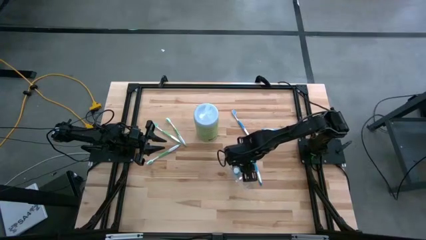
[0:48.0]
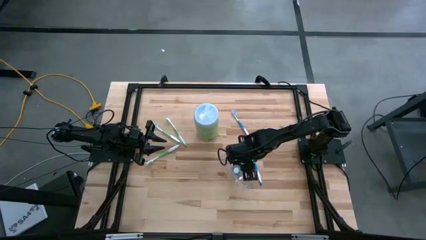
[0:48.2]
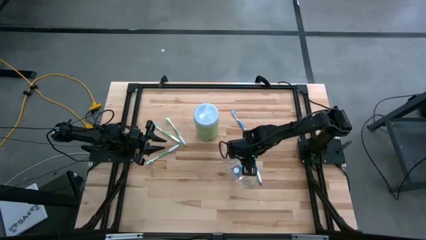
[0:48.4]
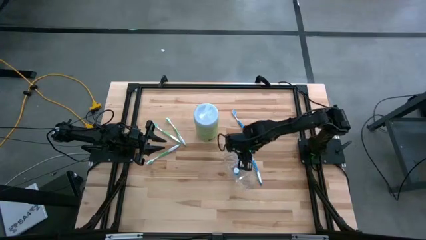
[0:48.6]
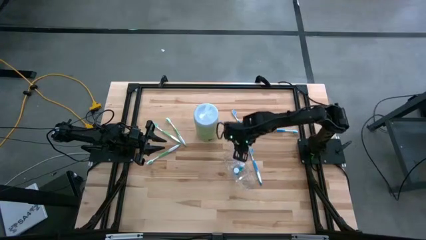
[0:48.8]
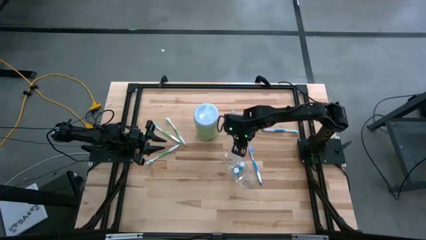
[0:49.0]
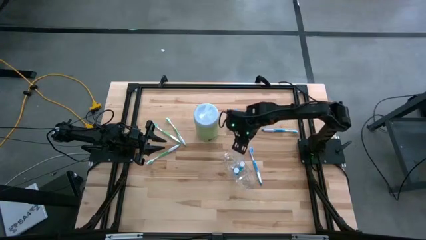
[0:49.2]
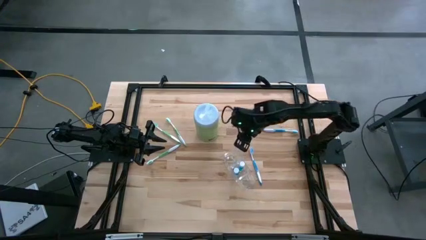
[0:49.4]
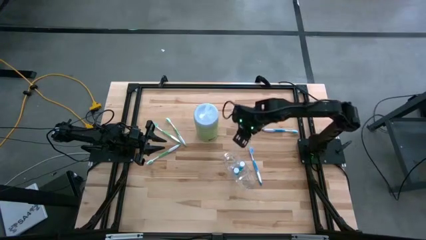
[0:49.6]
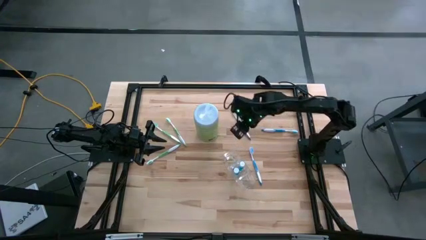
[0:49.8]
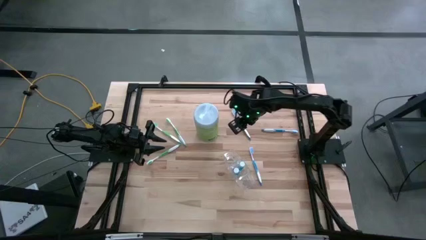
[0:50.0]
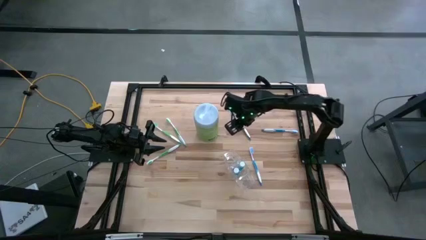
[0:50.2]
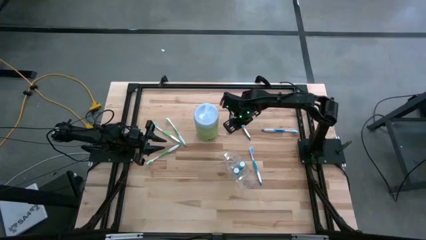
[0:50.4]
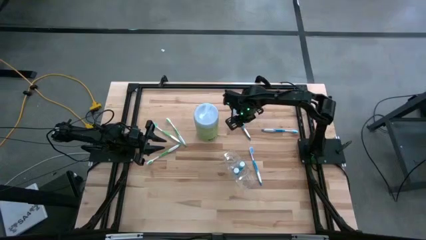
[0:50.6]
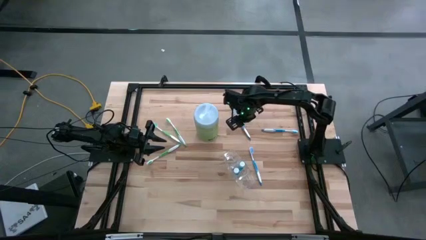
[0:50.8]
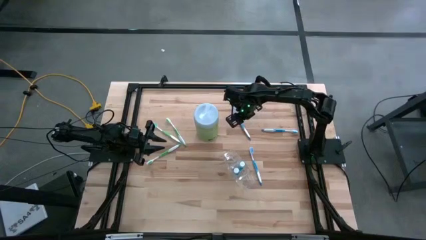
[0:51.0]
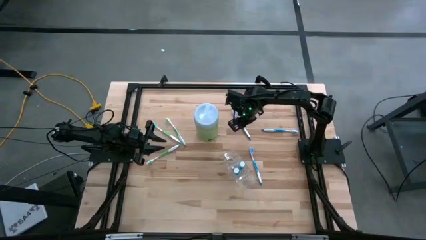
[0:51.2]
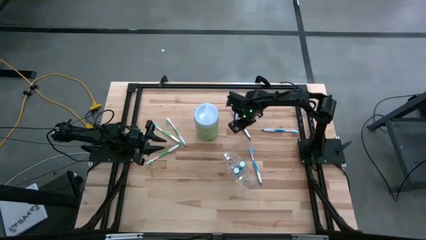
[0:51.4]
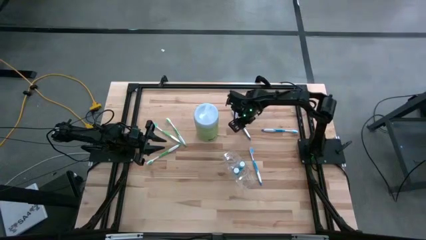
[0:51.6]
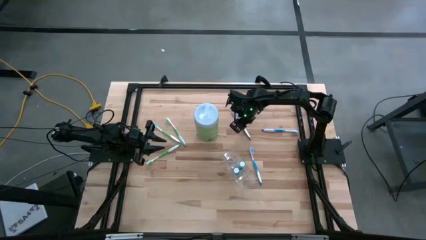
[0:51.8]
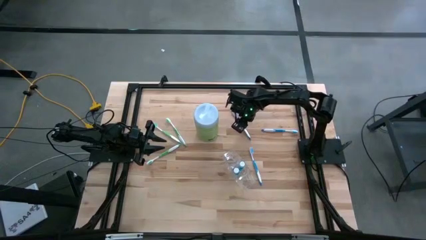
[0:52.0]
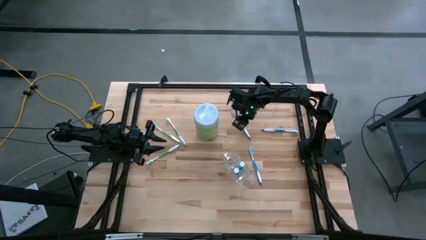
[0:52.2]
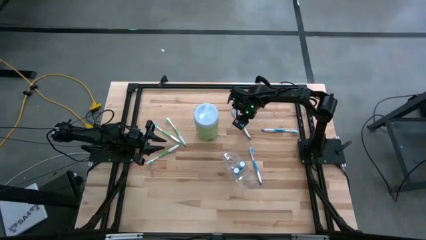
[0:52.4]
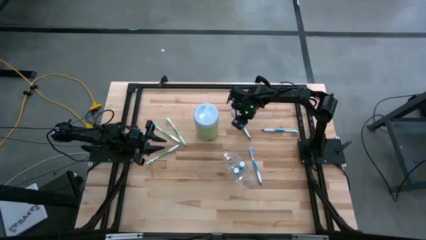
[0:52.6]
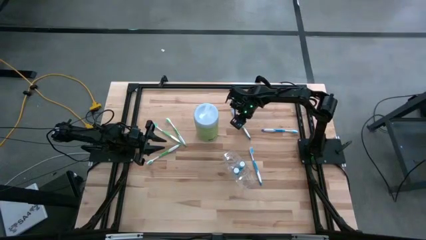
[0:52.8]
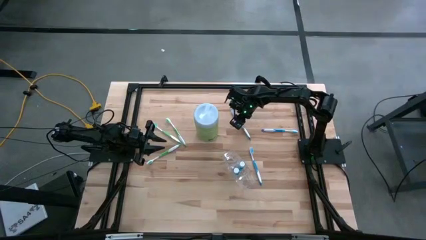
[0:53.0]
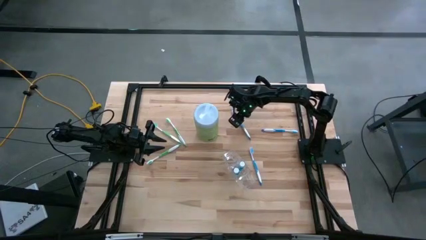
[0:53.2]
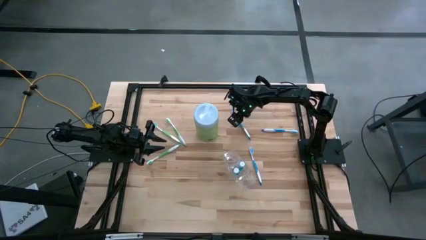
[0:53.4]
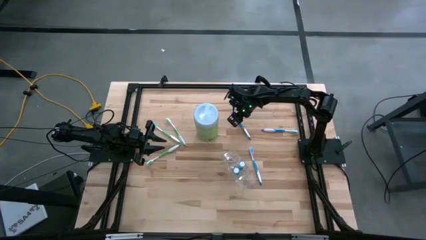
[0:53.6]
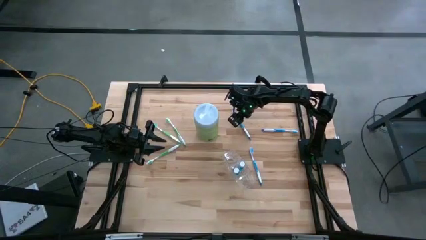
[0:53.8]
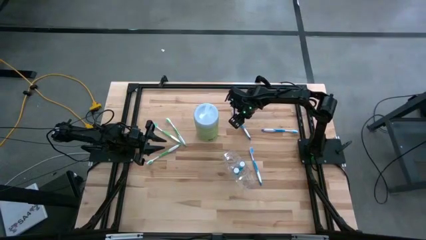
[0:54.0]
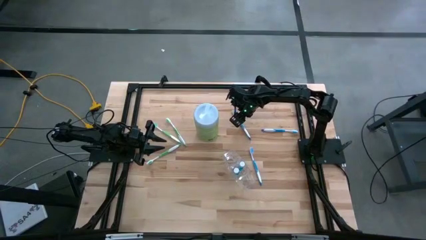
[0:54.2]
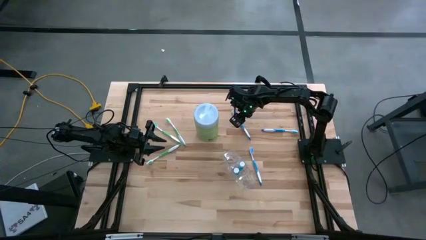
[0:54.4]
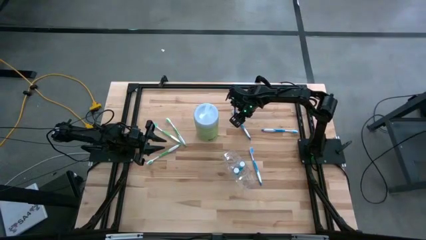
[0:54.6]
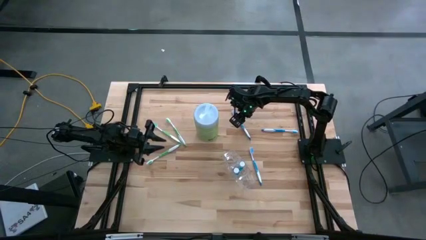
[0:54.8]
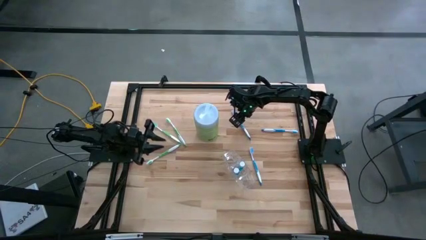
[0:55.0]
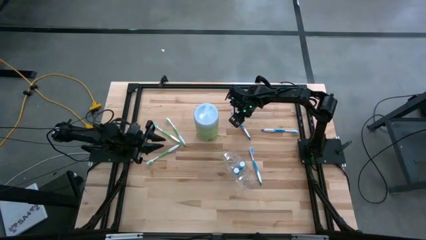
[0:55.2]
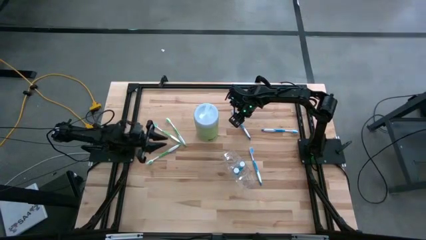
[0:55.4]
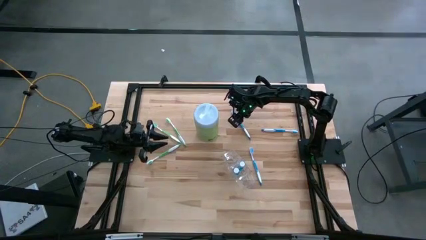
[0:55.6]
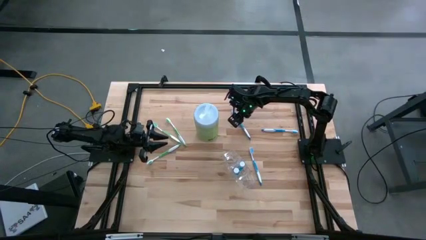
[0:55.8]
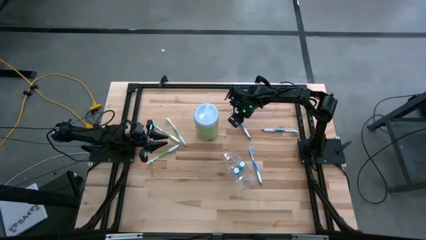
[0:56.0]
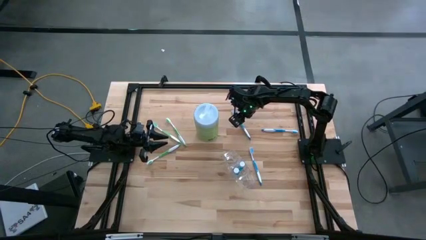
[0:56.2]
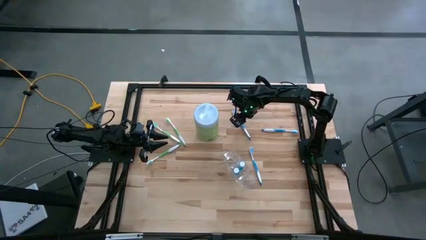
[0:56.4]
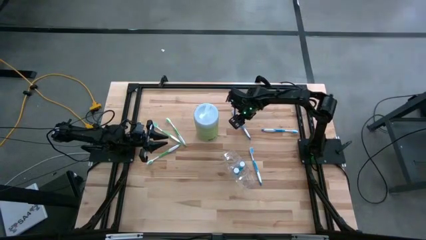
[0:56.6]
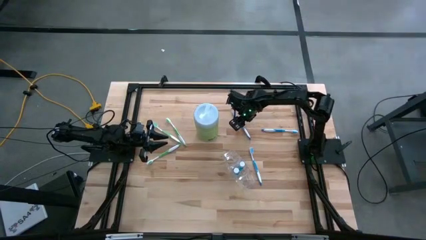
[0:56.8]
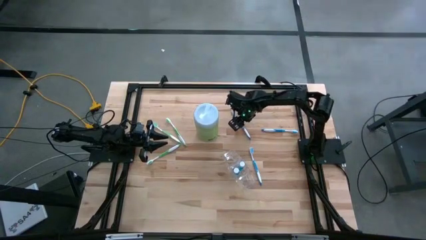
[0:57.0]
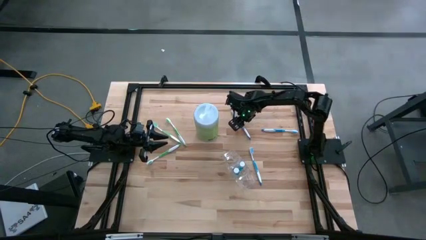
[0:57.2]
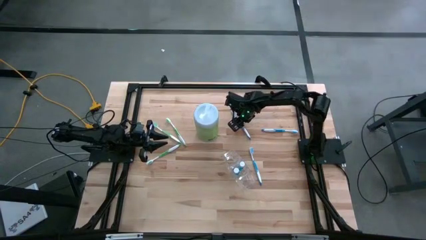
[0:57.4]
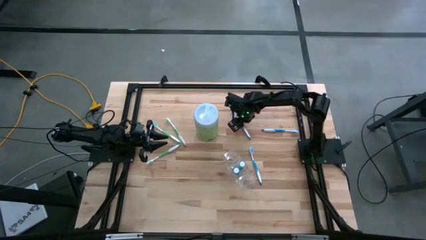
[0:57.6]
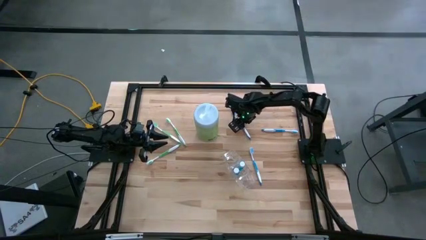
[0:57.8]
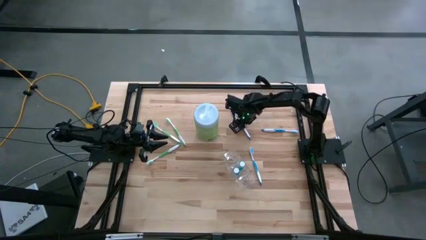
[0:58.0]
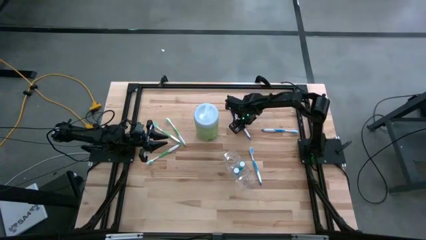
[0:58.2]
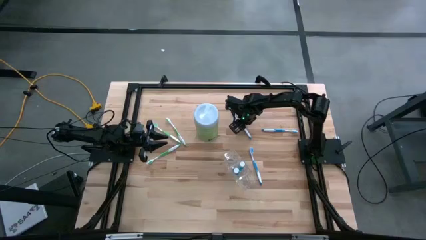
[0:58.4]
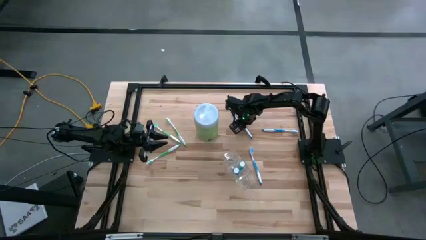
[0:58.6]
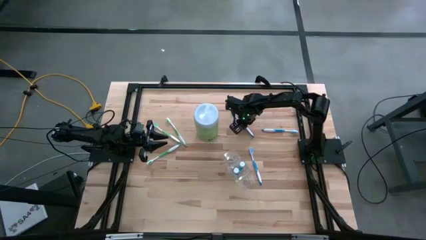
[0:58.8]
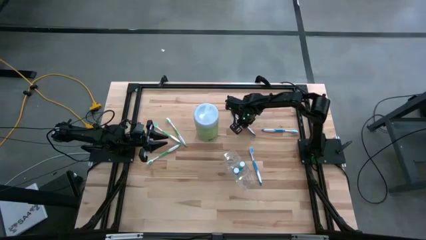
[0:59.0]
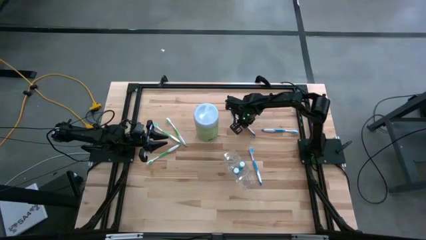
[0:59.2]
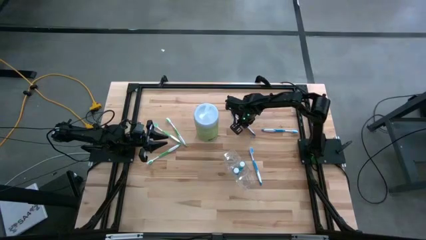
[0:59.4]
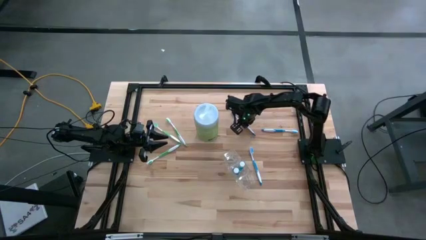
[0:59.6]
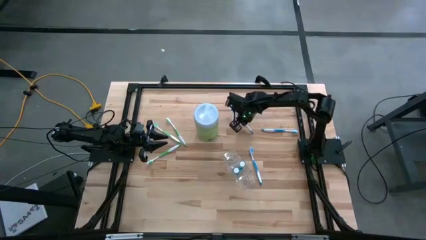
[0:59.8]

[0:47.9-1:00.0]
Task: Pick & Place toothbrushing station
Put the top left blue toothbrush into the transparent organizer

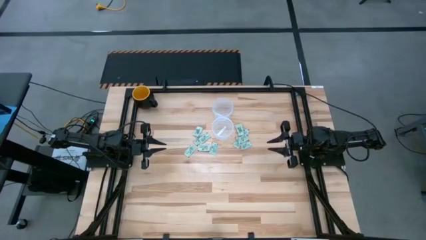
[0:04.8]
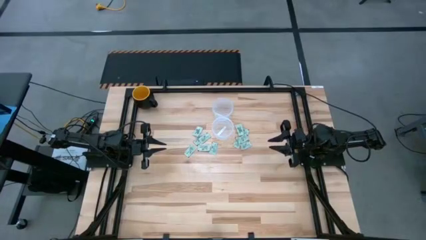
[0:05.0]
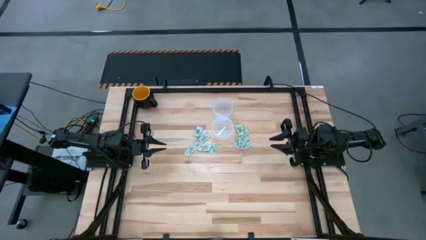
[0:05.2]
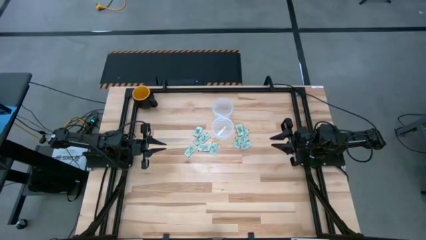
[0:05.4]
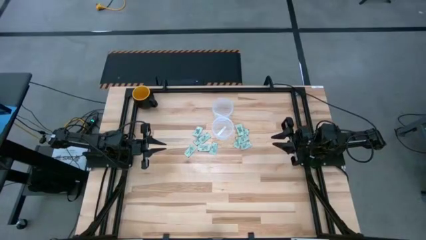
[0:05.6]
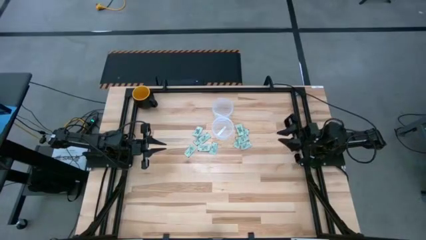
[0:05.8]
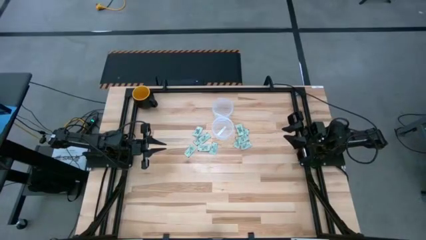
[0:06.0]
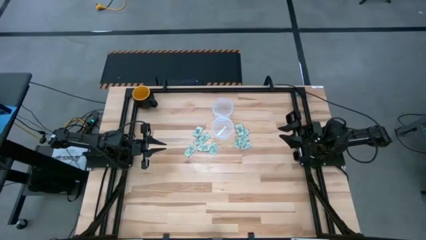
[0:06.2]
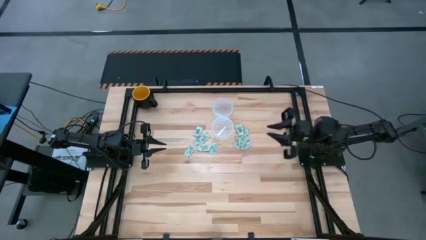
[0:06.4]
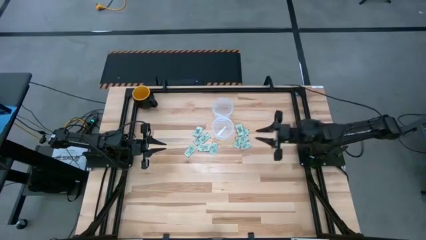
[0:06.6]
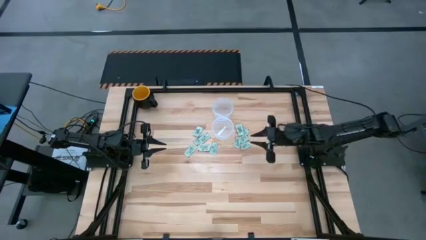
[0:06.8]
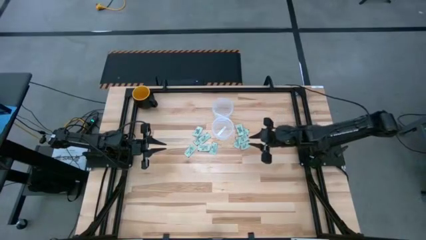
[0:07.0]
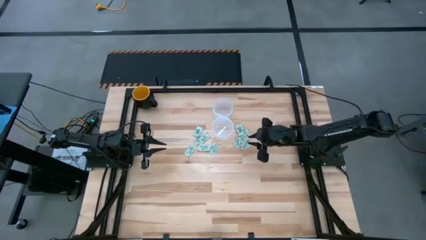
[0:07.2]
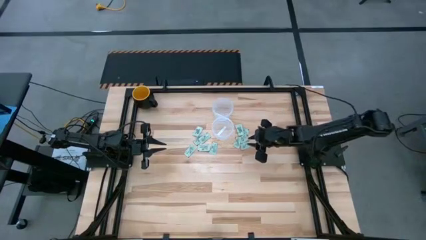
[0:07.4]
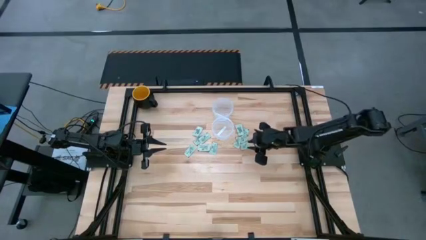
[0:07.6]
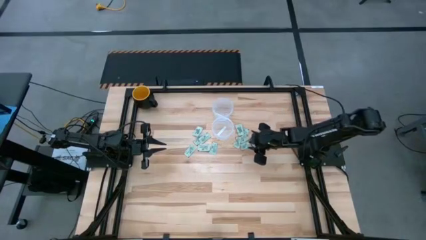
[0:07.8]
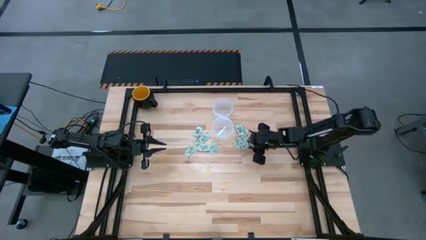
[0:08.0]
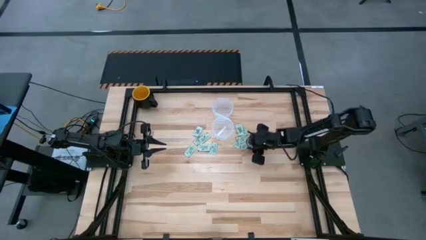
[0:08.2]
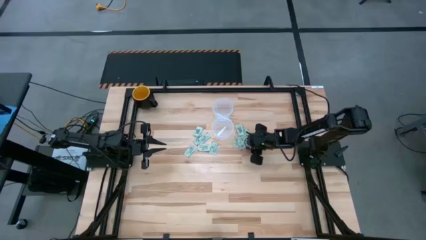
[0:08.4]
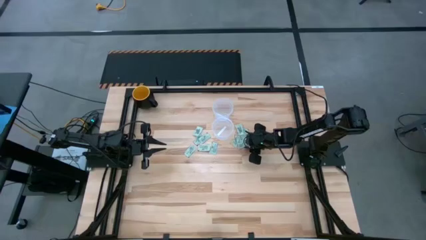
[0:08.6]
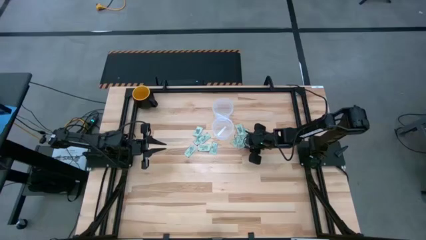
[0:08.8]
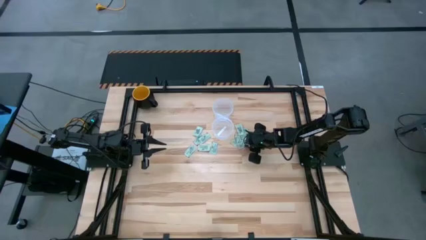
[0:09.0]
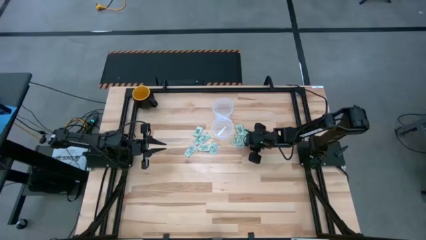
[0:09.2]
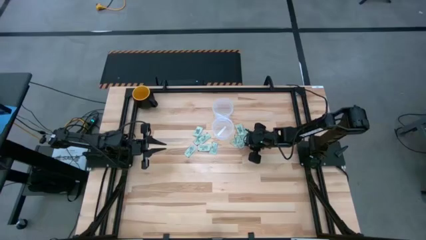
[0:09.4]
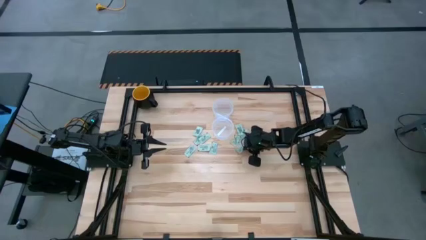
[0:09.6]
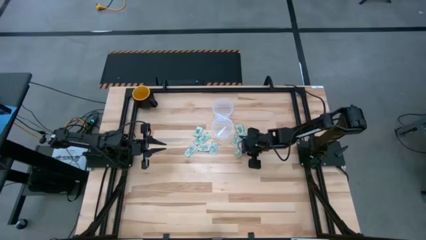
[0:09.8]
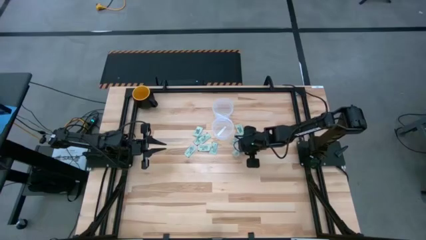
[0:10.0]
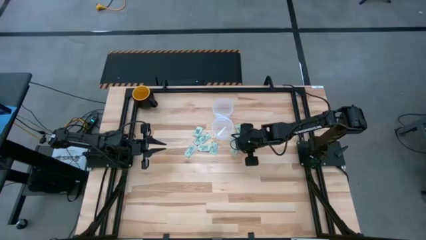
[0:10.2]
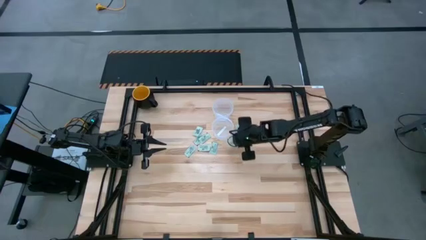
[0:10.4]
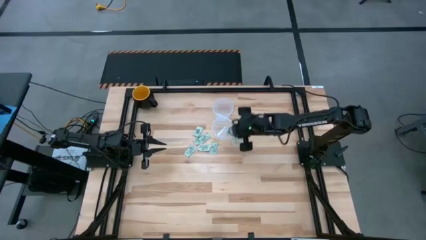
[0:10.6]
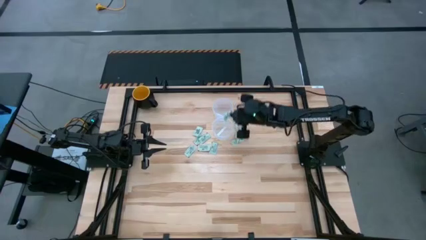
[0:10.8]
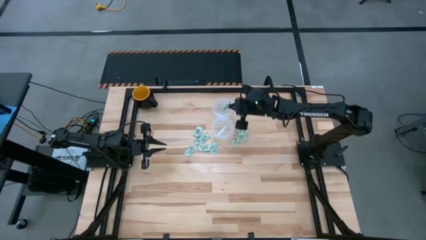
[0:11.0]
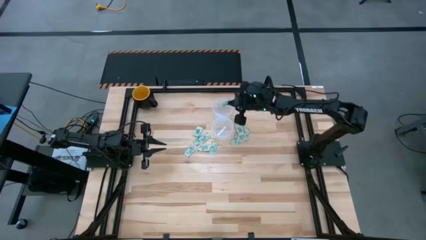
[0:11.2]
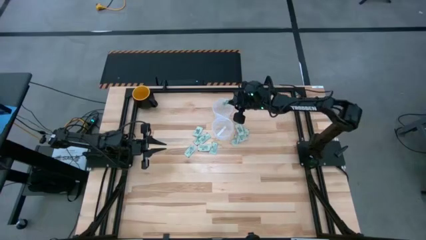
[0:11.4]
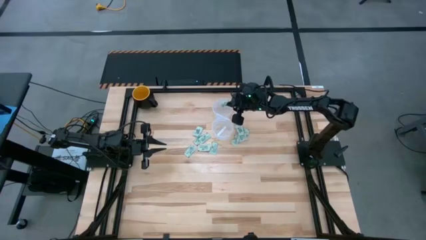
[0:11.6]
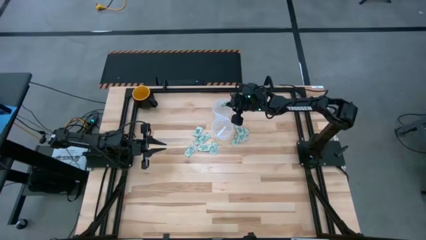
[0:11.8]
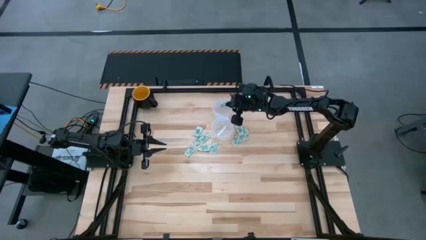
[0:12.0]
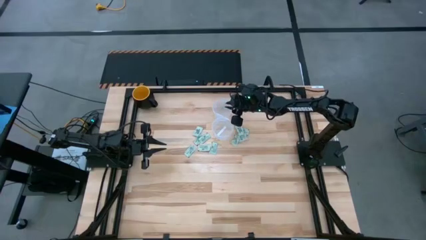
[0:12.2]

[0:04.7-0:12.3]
Task: Pick and place items into bin
Put the green stevia packet into the top transparent bin
